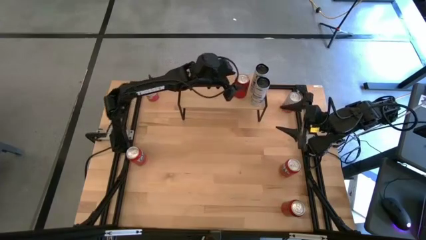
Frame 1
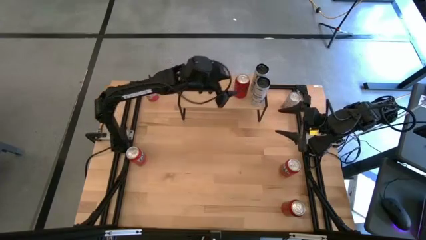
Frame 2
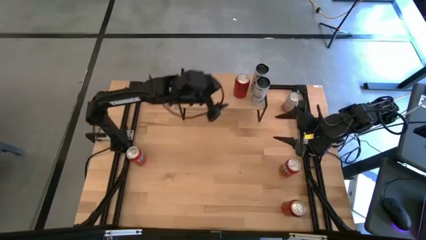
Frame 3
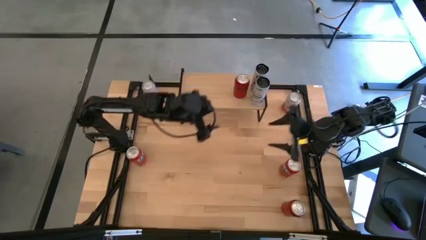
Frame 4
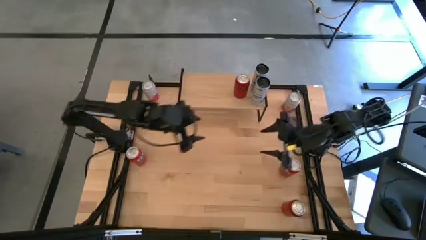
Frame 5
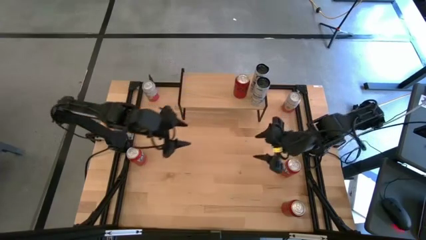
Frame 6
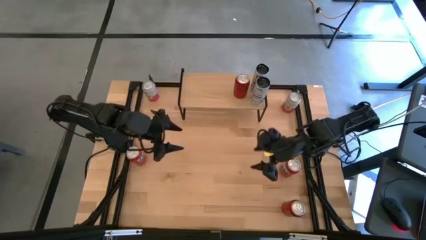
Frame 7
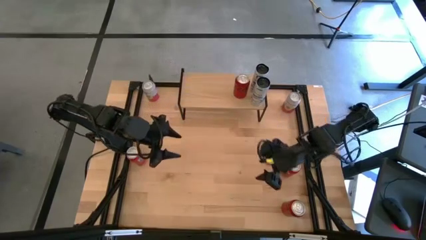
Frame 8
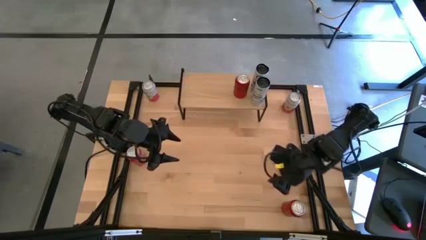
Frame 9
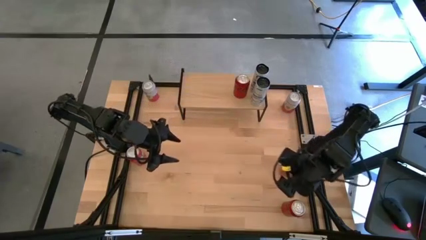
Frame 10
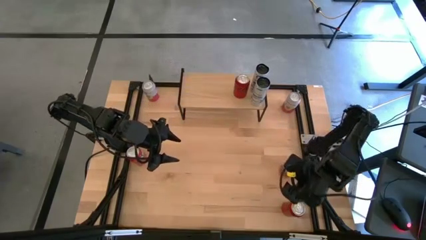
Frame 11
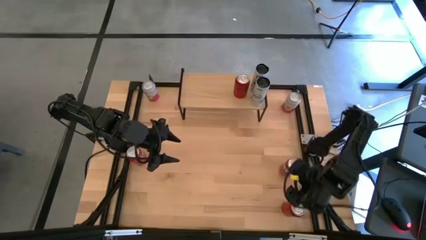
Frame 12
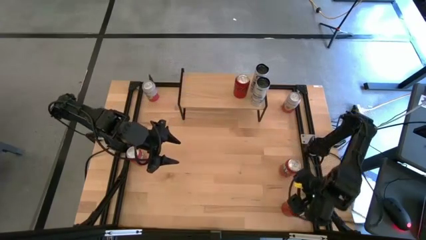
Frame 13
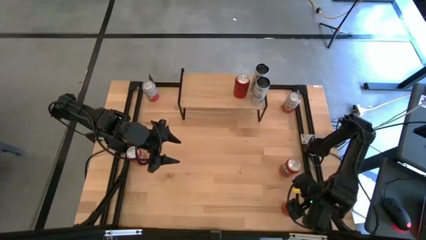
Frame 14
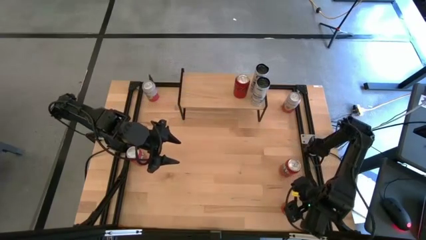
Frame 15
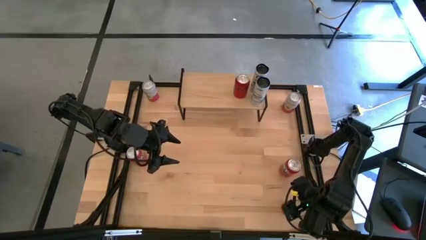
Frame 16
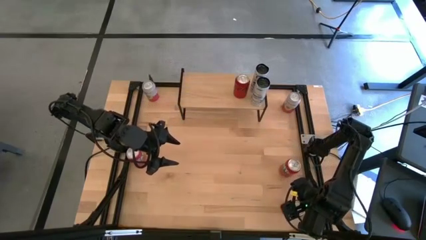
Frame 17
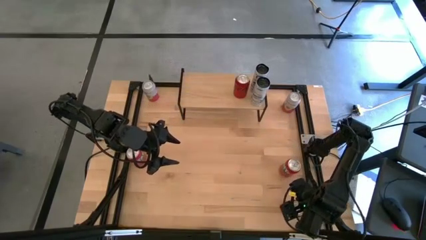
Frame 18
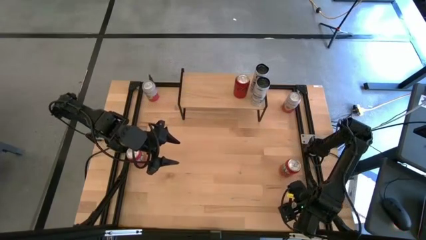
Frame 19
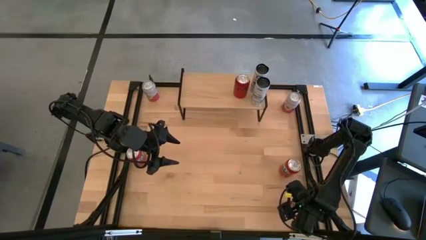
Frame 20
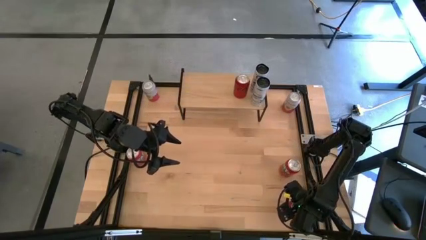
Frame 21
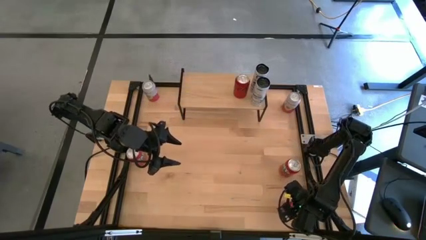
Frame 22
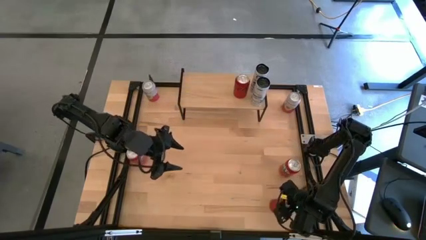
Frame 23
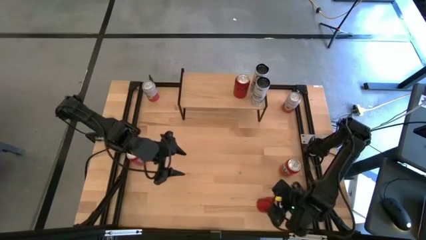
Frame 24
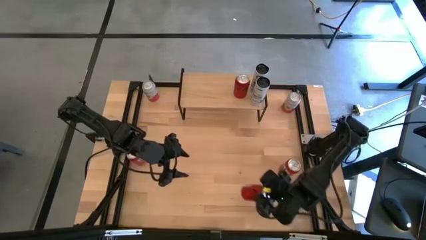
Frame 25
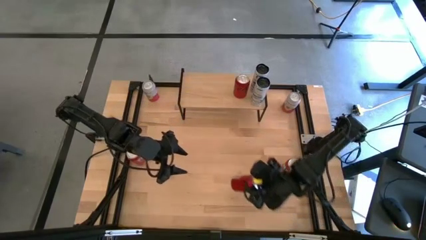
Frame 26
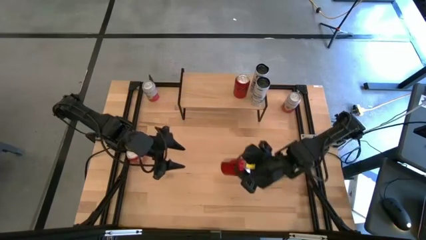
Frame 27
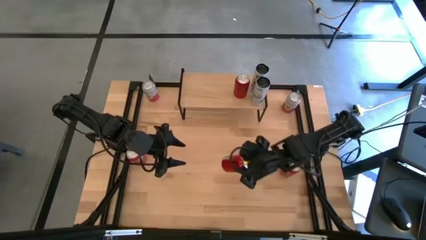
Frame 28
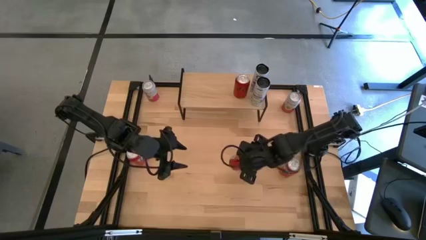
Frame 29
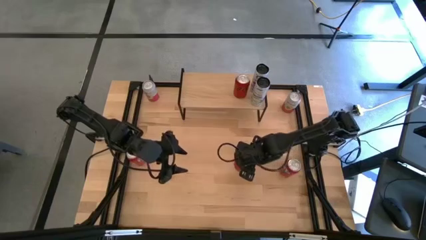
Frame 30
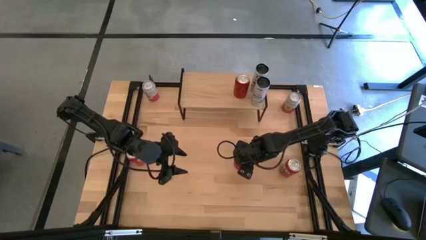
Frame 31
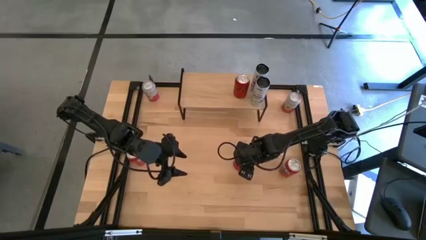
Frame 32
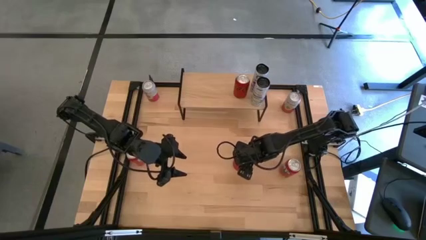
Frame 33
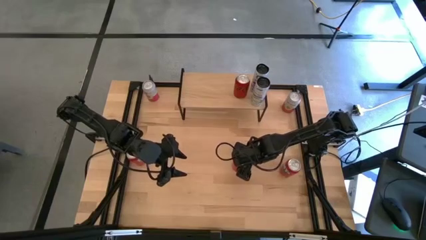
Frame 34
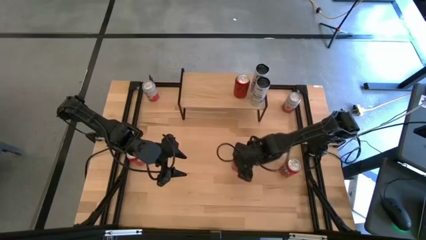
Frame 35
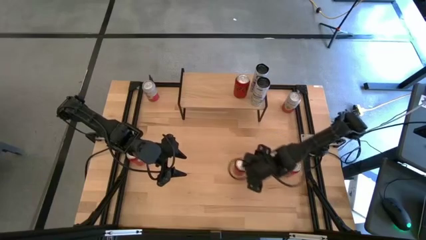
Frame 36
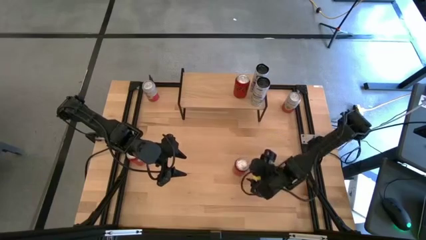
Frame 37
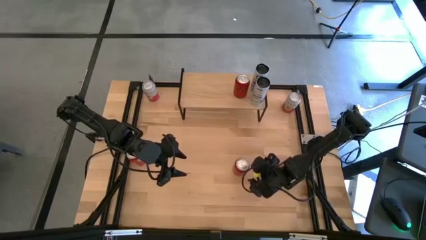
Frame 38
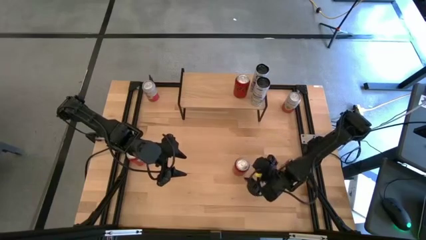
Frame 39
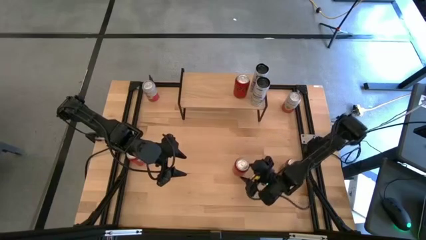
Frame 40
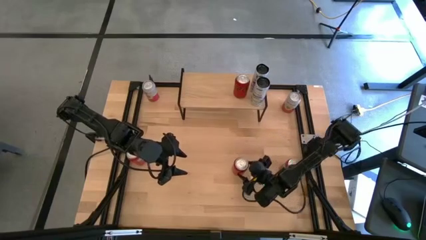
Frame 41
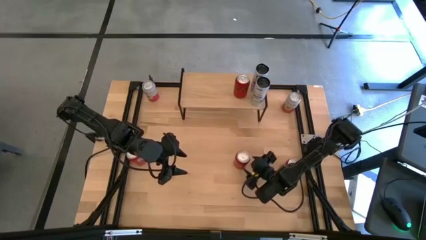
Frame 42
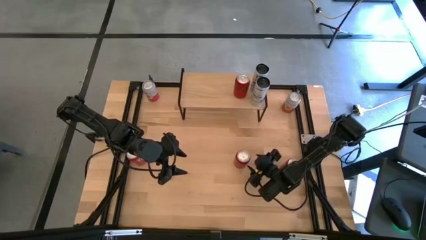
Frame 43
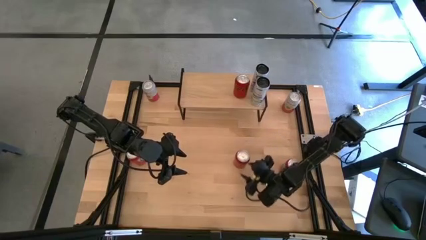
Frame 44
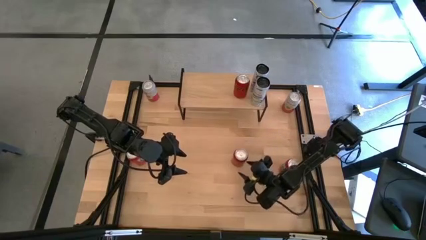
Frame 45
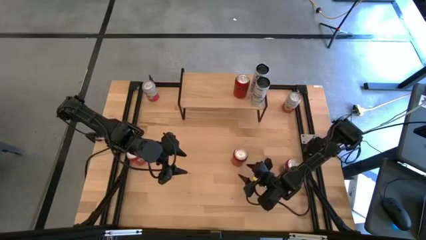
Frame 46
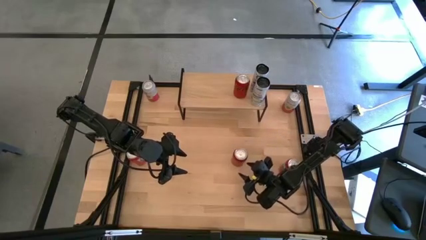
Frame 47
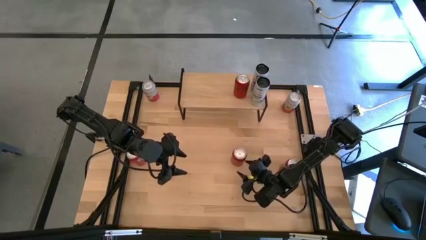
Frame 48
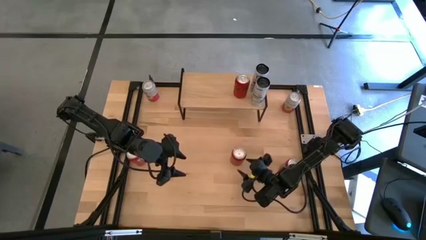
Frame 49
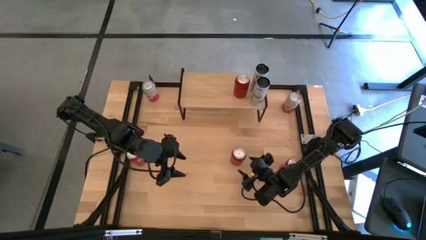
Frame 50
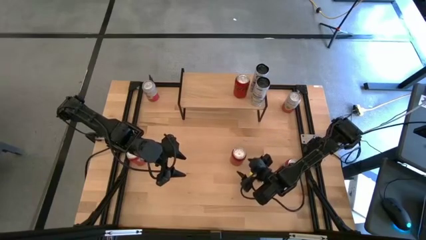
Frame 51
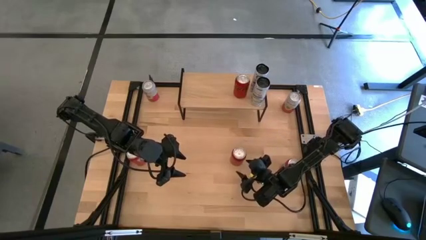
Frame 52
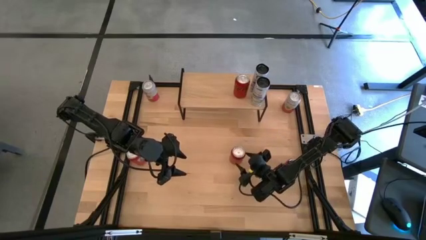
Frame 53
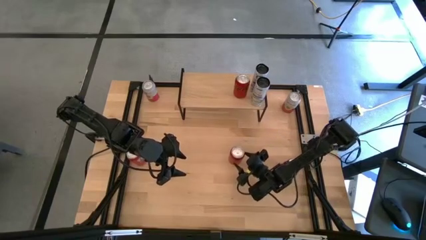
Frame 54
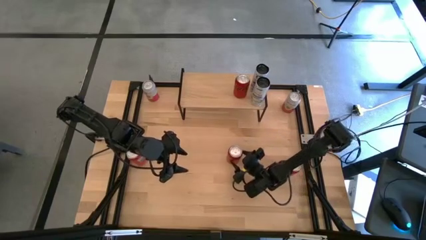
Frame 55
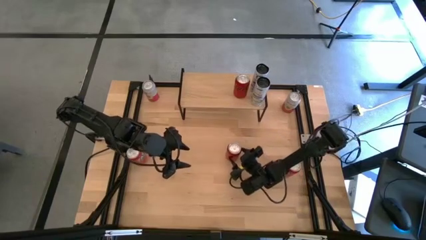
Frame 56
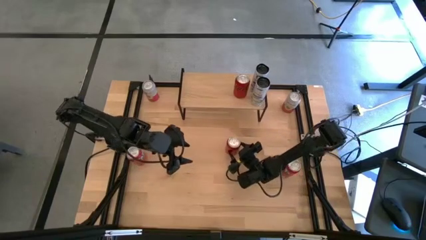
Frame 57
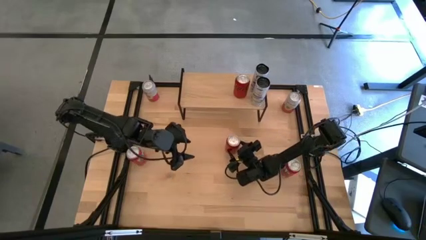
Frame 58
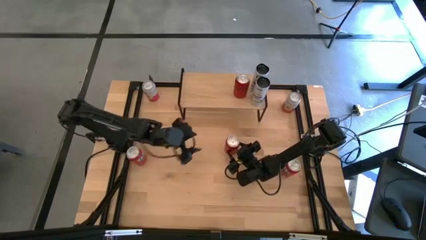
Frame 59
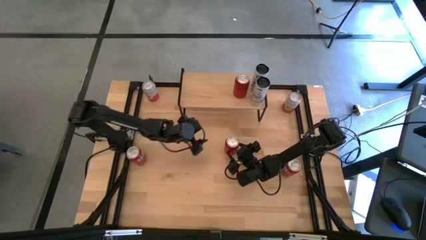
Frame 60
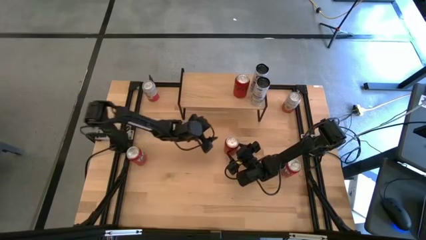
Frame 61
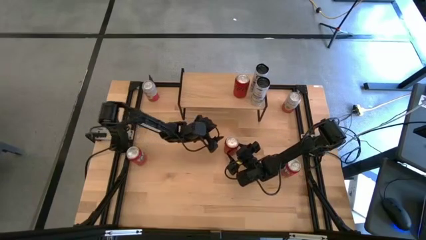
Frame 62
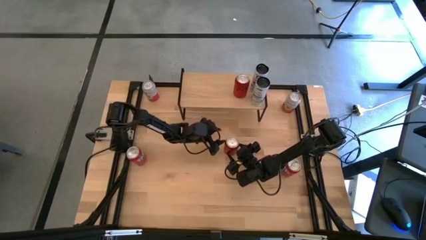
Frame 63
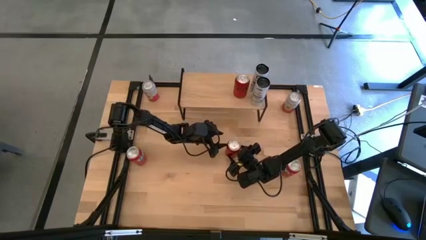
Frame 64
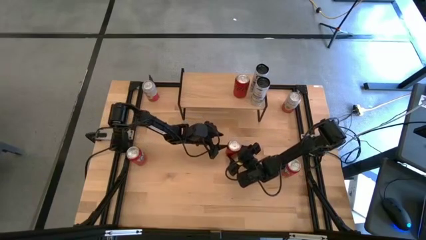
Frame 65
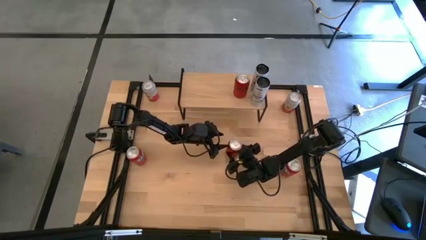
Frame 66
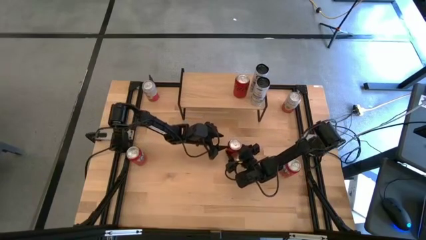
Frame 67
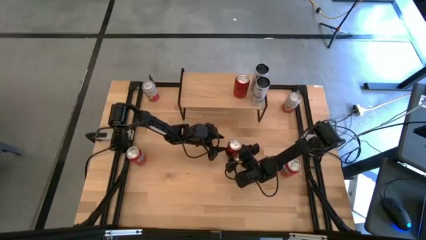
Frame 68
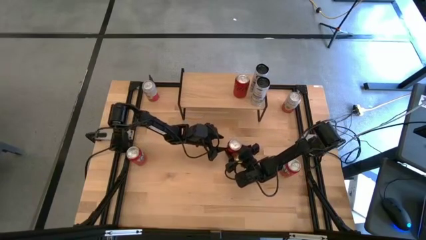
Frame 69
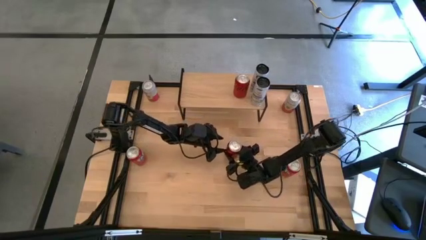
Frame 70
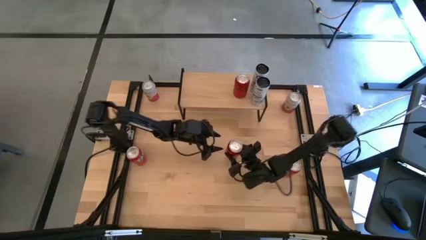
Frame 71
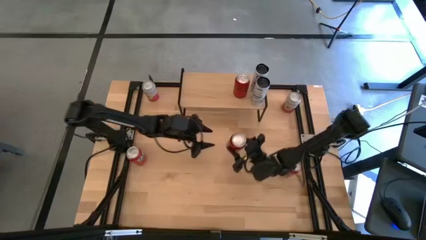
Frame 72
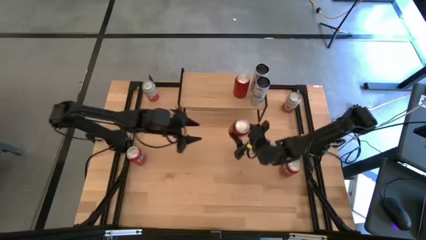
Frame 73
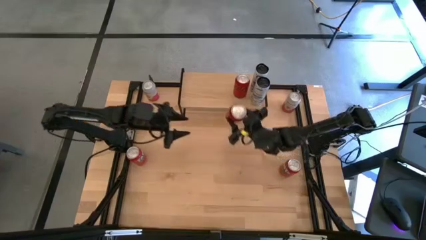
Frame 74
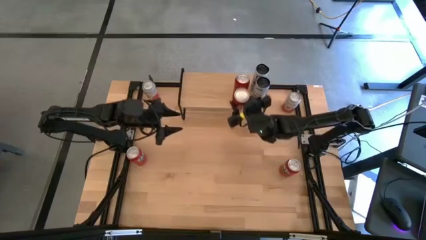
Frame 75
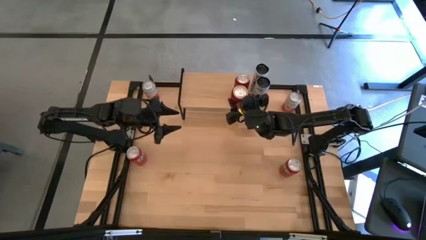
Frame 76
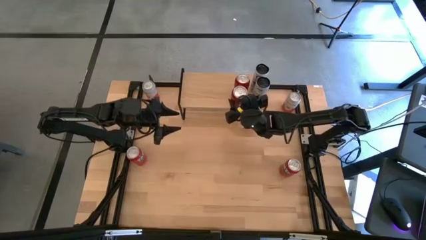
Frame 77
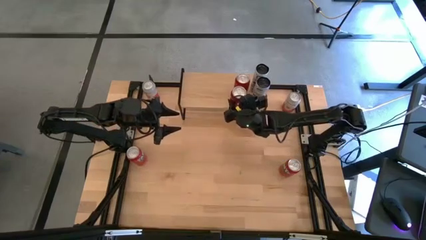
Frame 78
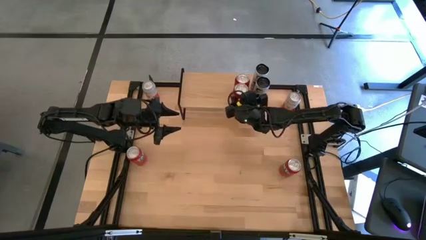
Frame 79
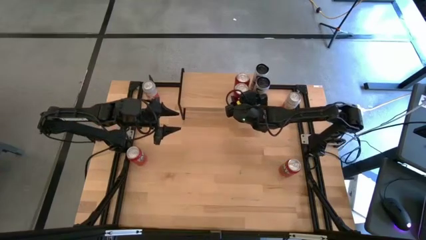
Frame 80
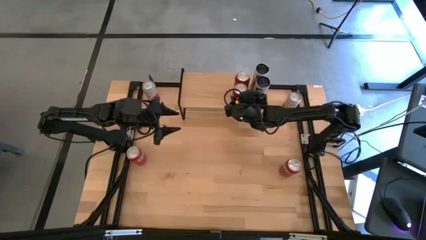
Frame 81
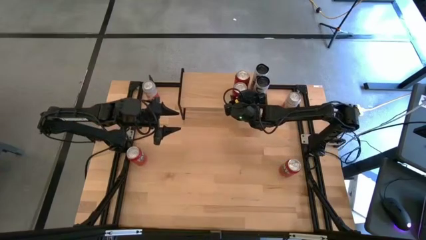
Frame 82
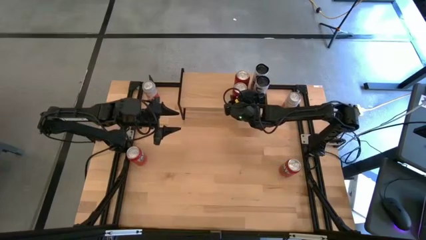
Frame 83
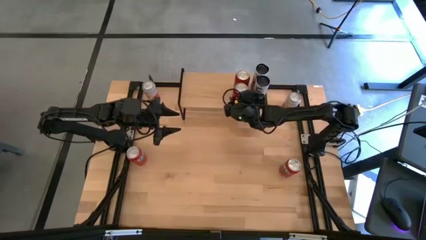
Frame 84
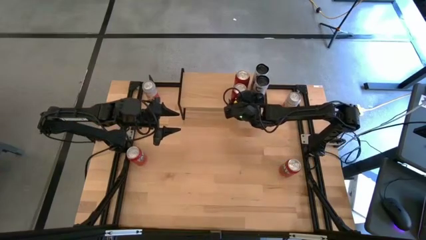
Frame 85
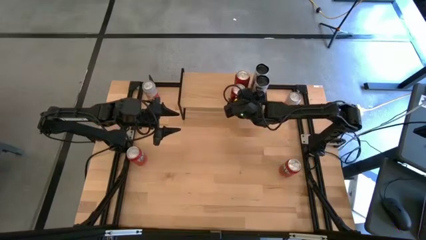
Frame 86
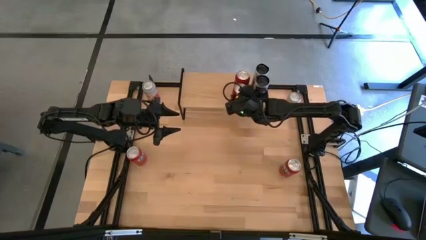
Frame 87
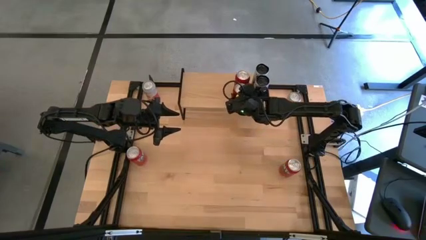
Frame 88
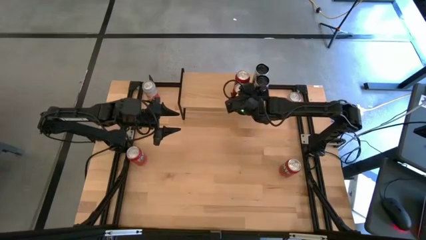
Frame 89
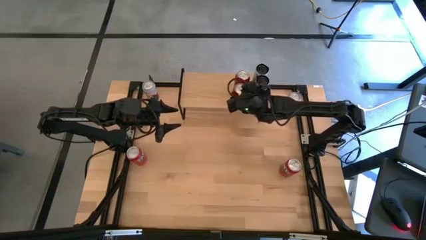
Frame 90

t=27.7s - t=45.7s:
Task: Place canned beverage on shelf
Put the red-black soda can on the shelf aligned with the other red-black soda can
